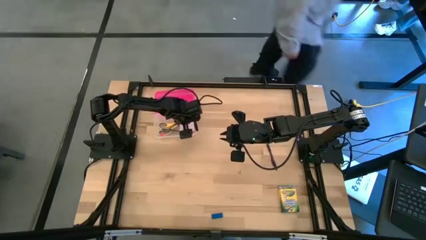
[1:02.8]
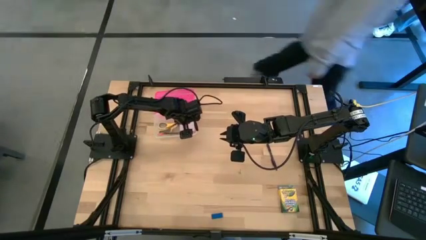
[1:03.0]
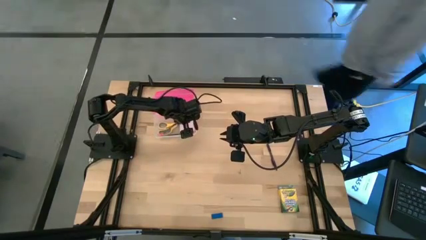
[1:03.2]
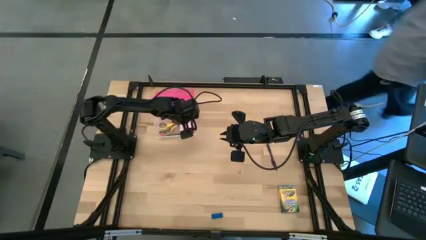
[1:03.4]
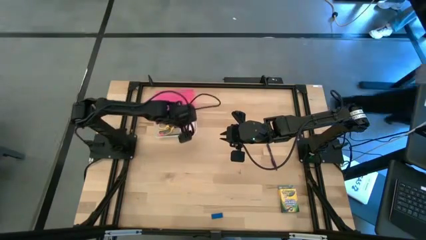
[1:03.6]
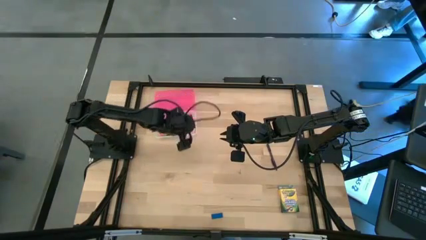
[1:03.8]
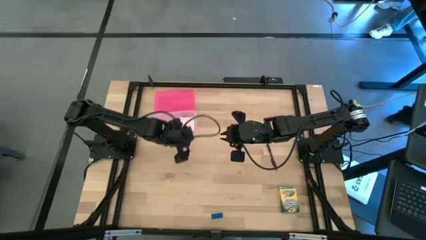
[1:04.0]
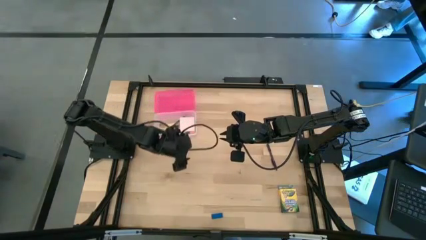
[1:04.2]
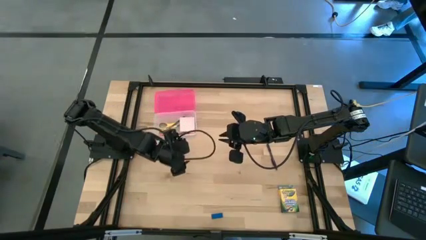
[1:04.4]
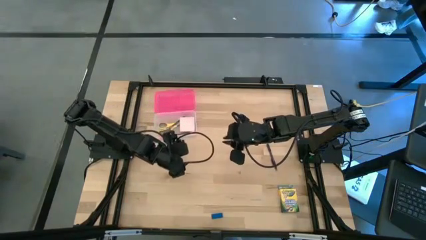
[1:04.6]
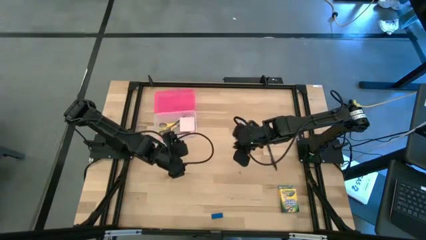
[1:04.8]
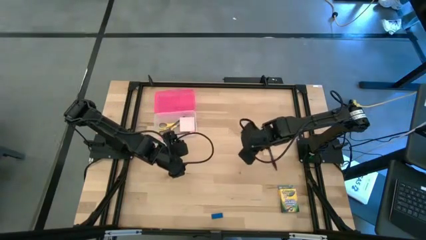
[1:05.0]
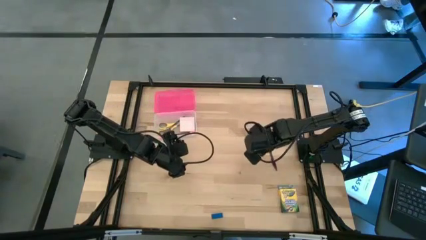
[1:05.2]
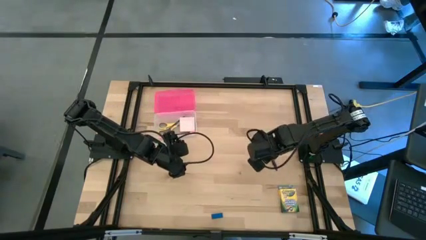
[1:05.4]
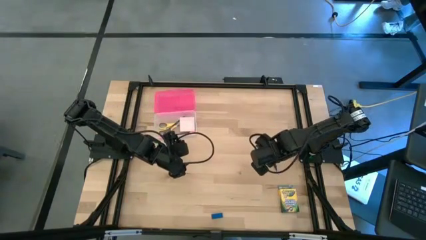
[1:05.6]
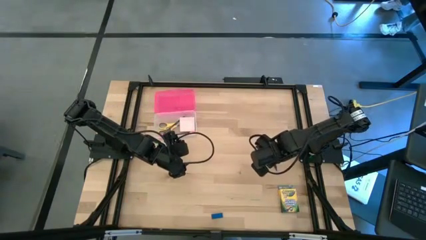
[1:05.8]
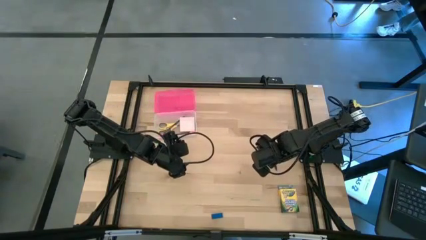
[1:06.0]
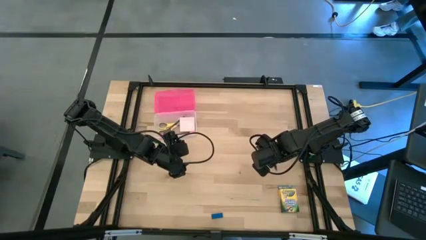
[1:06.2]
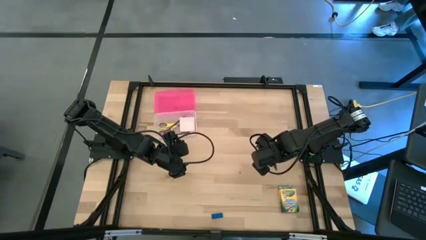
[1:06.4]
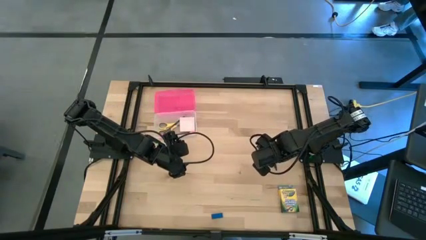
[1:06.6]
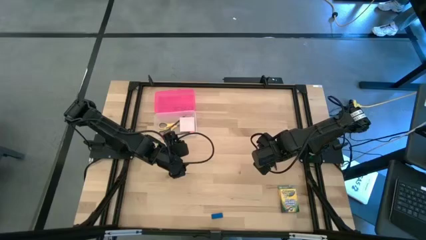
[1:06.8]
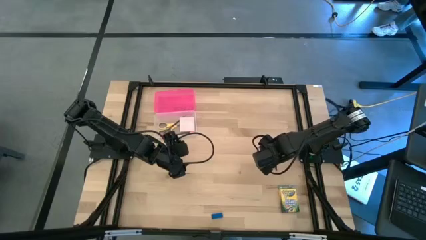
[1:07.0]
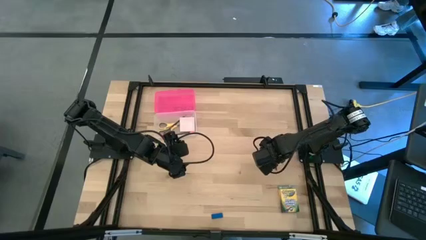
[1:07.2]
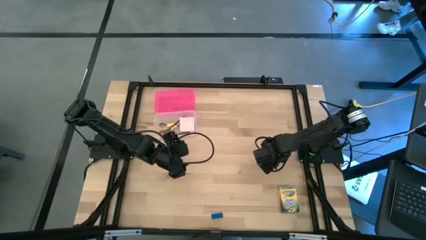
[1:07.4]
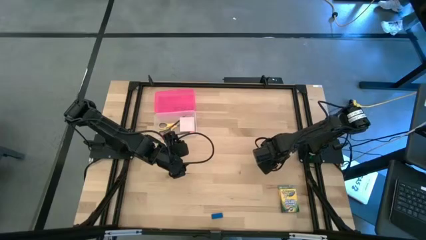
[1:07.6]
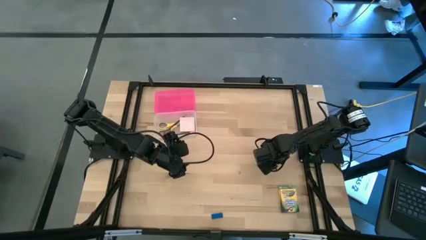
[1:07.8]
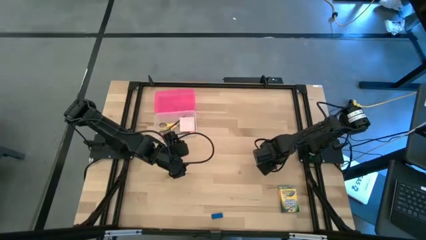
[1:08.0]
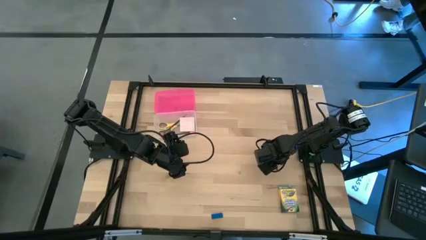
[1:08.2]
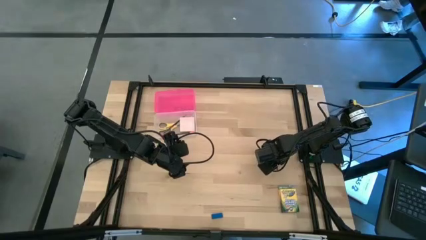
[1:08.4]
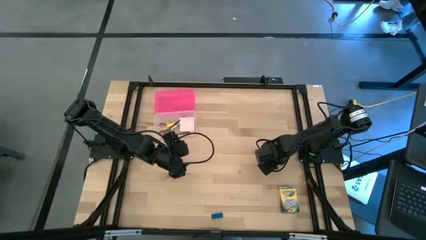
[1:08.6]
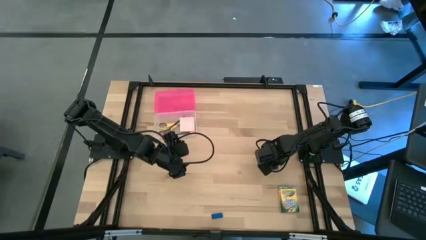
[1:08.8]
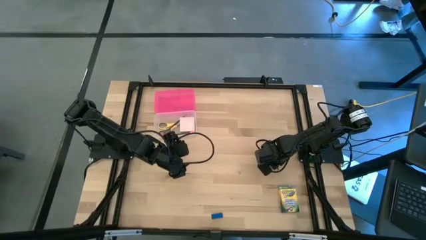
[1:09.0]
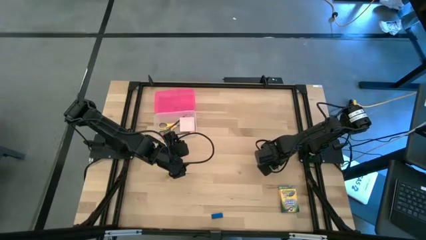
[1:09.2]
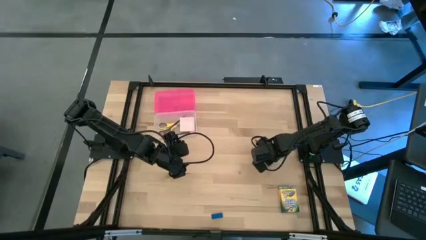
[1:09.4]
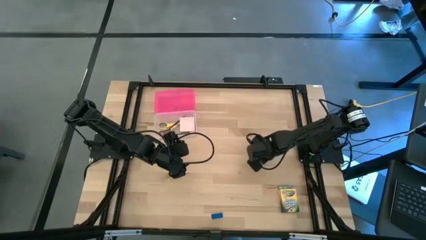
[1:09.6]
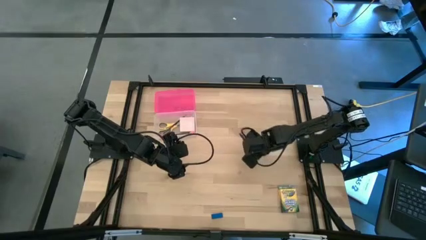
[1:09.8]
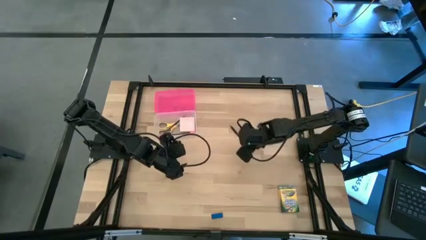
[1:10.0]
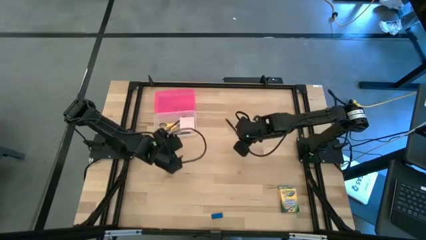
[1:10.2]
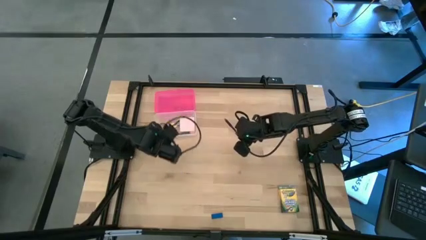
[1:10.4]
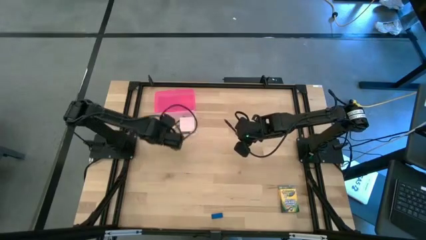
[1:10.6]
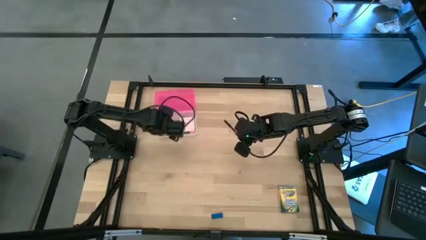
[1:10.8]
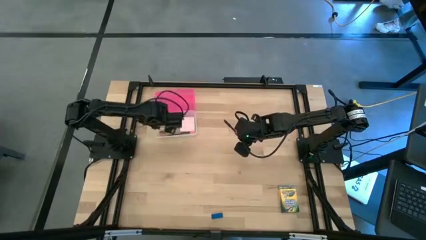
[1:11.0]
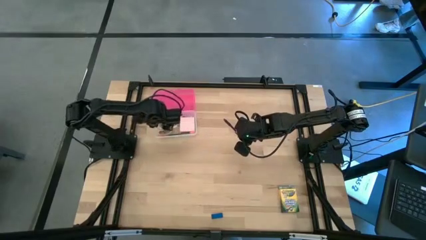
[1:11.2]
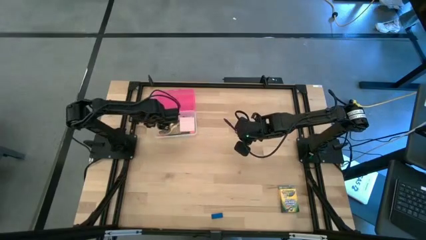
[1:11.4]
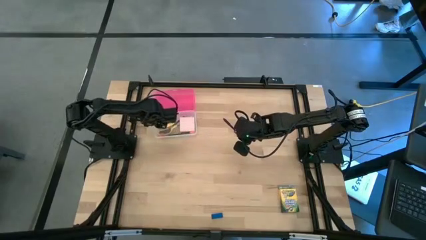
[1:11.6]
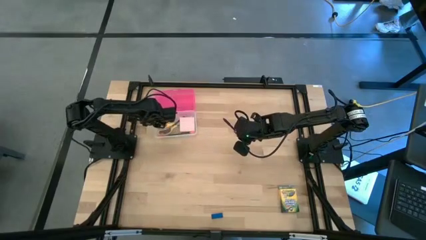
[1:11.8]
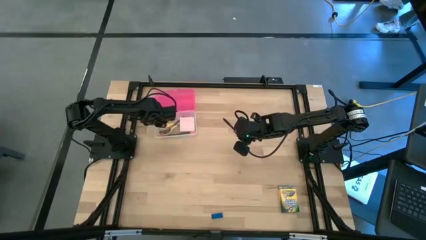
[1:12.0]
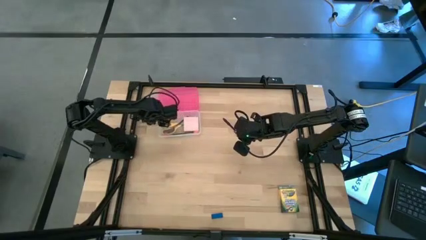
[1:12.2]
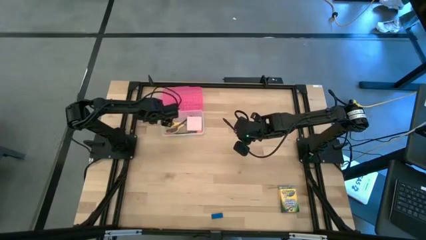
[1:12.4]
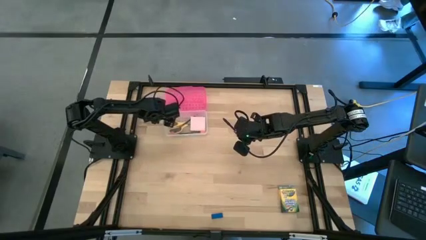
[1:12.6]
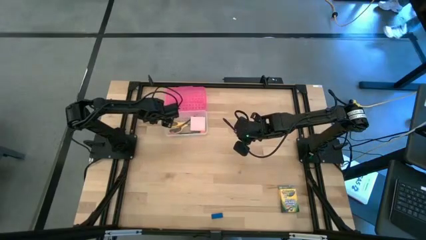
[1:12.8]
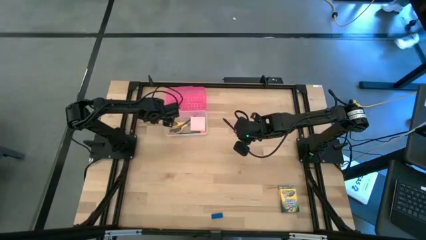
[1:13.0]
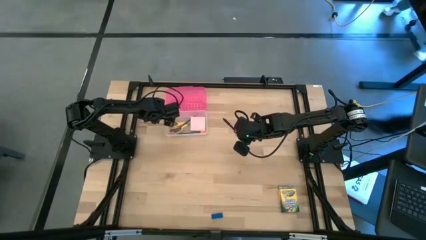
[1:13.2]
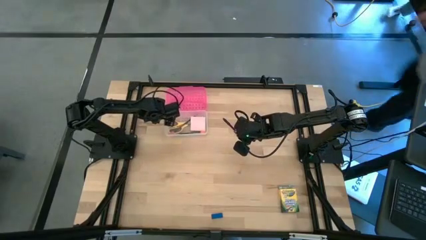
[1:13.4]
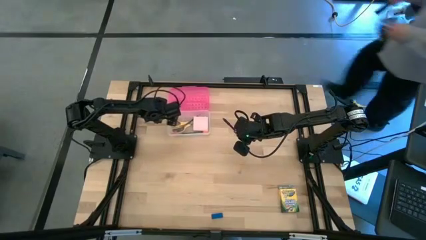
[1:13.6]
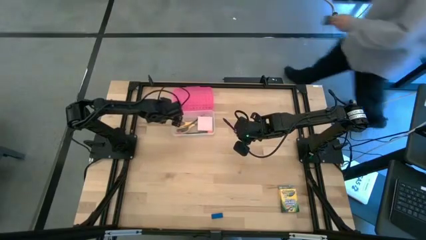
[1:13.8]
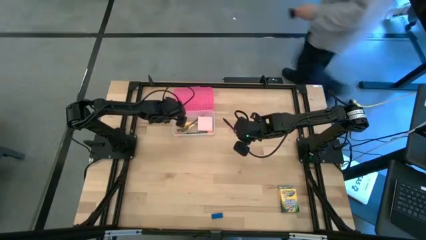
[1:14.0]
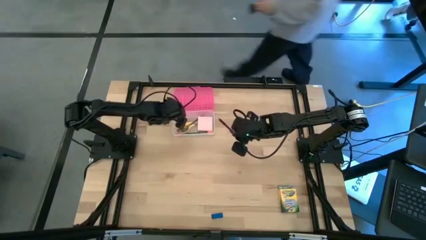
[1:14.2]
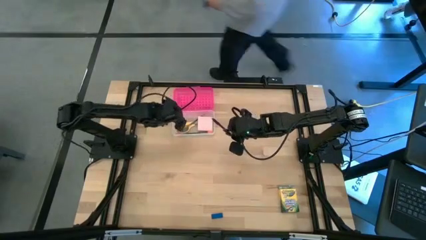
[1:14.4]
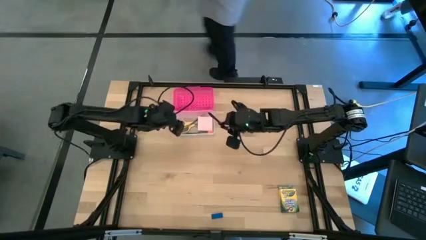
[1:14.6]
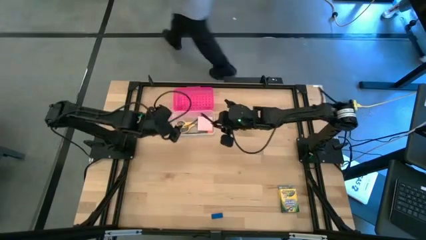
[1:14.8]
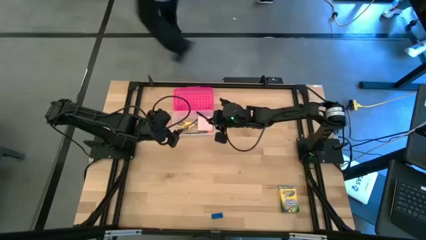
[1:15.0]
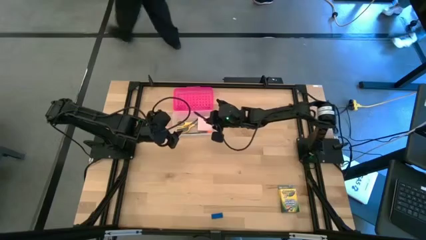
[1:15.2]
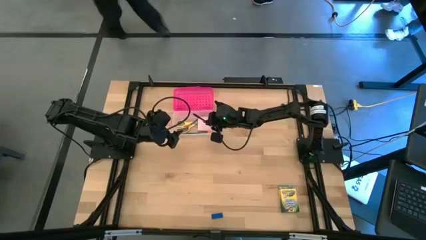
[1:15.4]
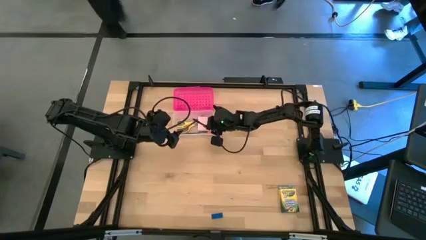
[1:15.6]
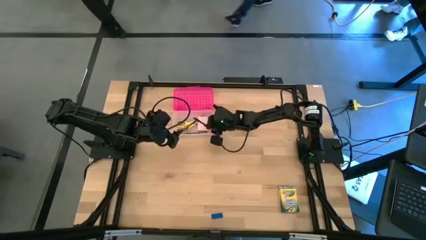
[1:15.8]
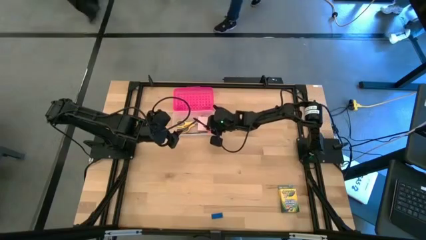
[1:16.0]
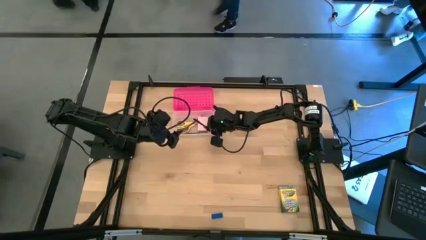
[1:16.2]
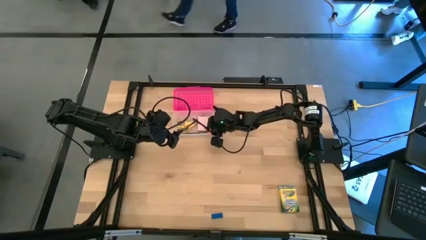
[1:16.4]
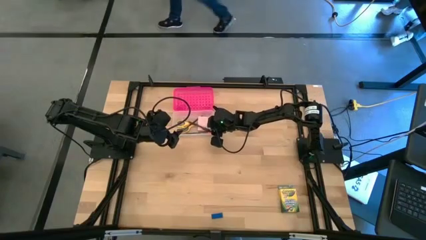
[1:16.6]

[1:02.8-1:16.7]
Task: Pack school essentials
Put the purple pen into the pink supply box

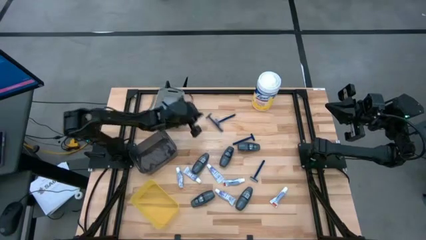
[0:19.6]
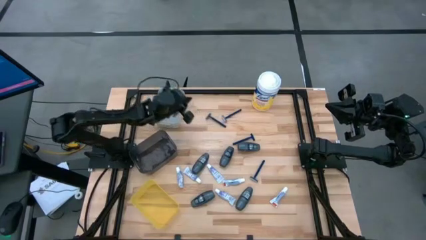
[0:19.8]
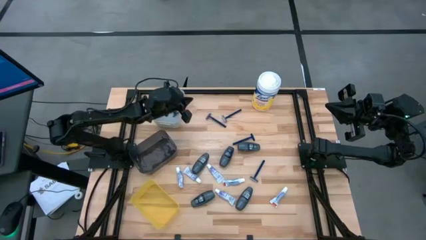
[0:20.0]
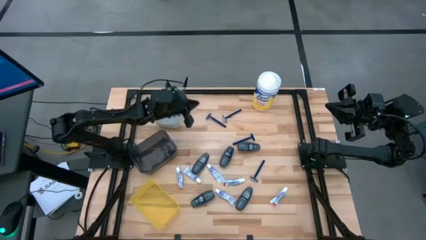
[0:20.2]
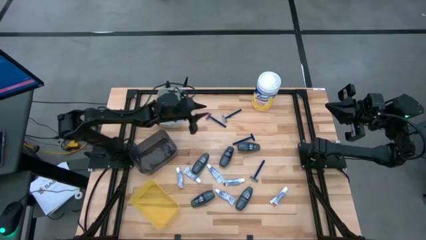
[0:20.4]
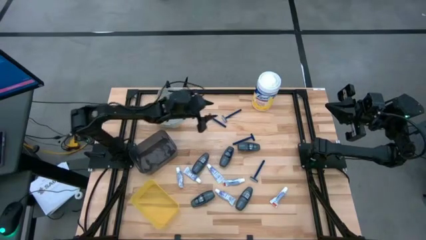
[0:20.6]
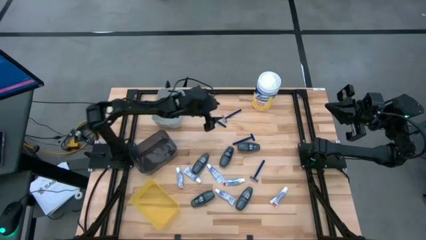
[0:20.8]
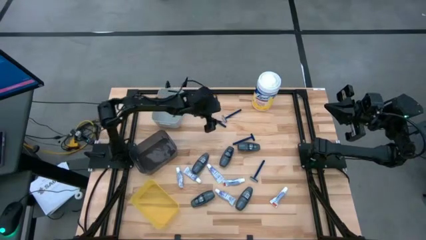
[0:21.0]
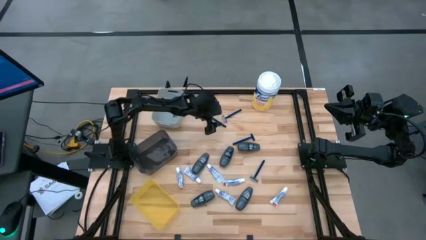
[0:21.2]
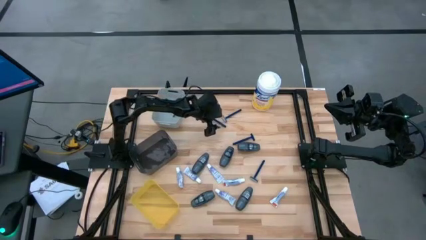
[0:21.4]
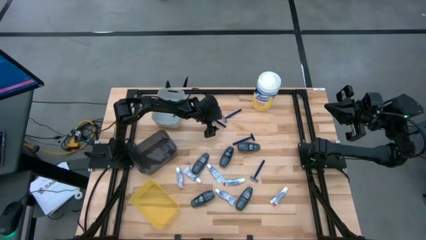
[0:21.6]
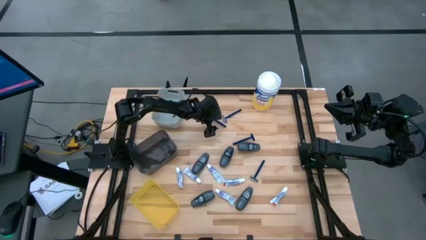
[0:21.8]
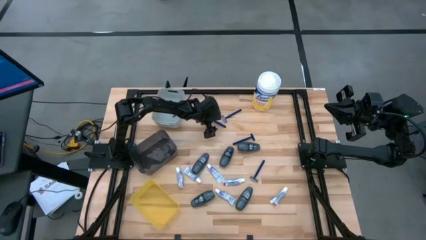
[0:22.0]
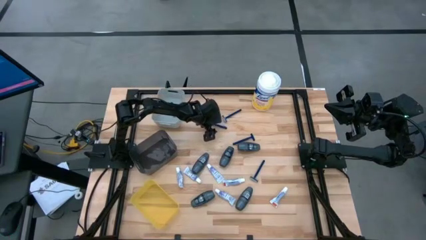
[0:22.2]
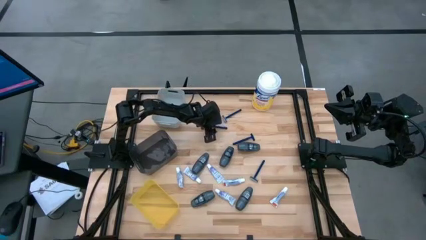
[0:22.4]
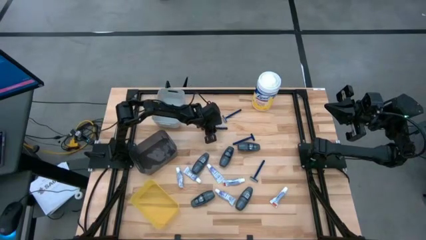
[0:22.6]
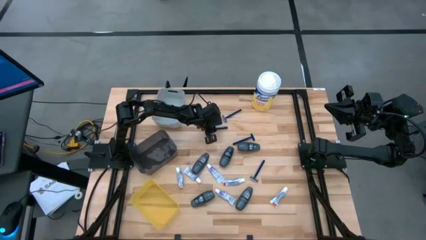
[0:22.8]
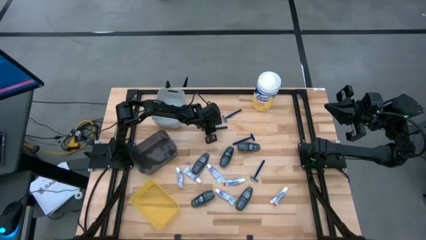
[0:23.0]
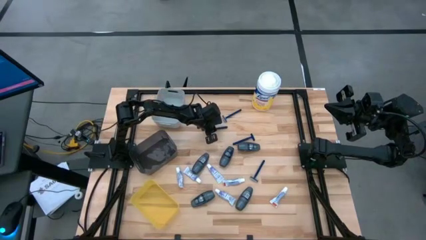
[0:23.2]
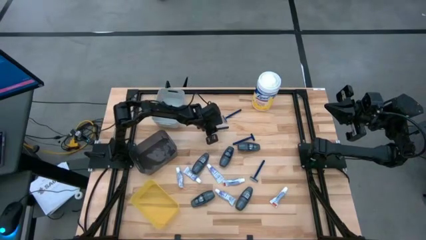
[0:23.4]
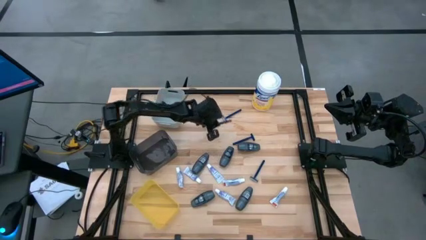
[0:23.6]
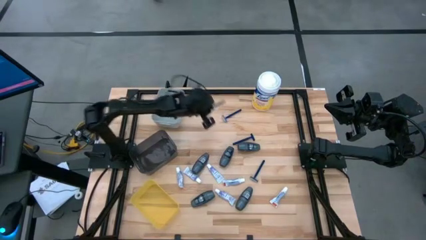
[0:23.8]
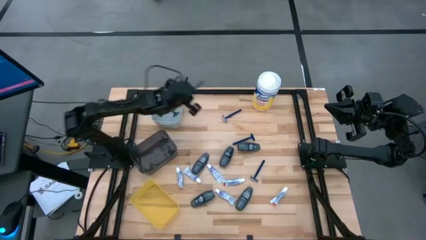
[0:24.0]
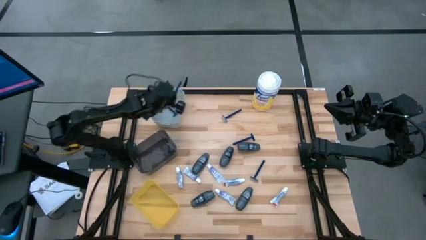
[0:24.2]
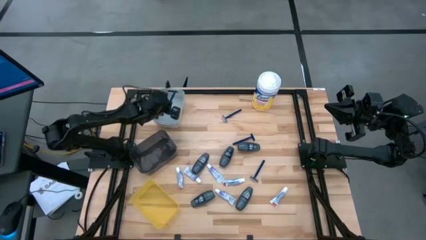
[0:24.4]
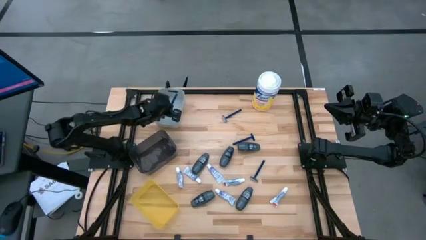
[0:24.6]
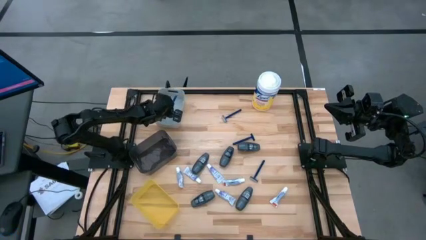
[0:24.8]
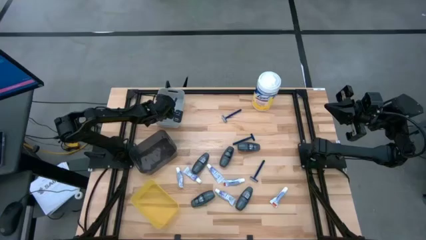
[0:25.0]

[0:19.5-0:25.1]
Task: Pick & Place Travel size toiletries
Put the razor into the gray bin
